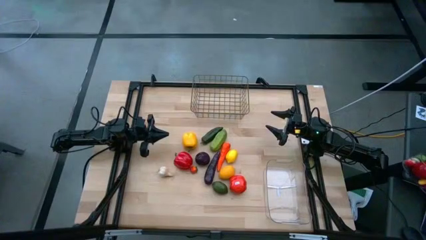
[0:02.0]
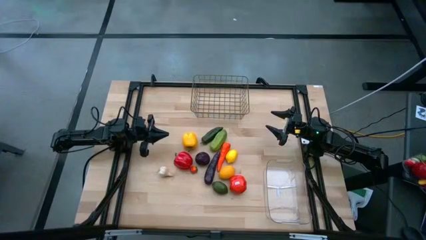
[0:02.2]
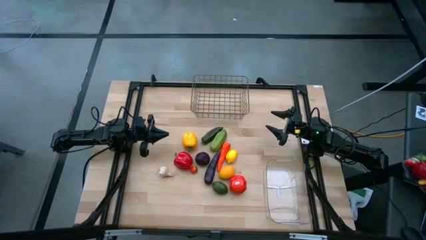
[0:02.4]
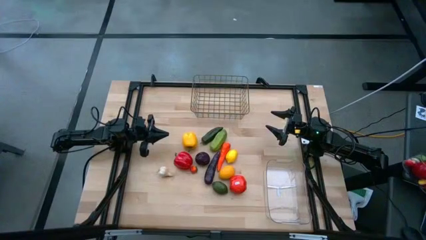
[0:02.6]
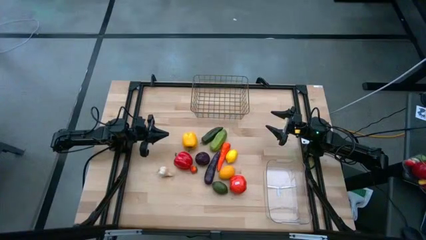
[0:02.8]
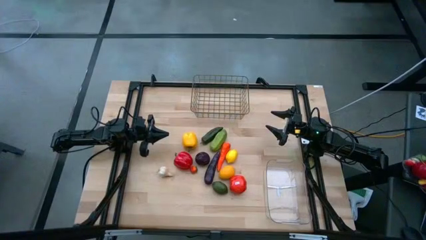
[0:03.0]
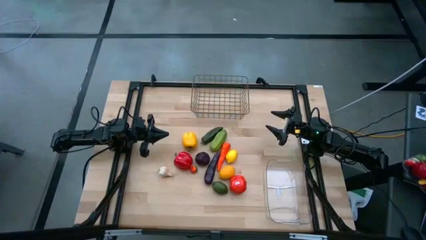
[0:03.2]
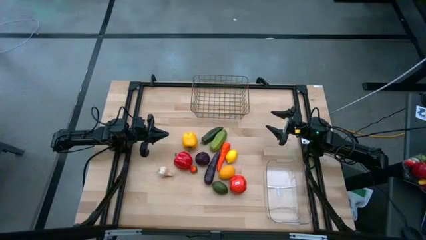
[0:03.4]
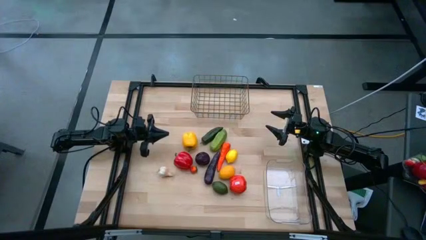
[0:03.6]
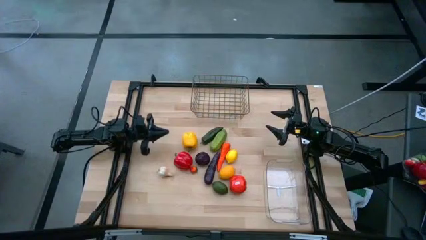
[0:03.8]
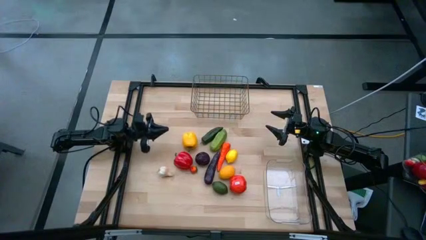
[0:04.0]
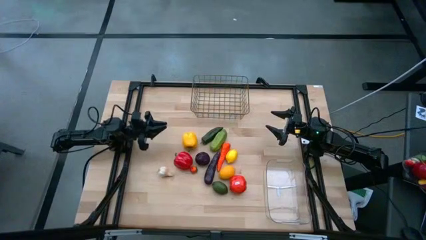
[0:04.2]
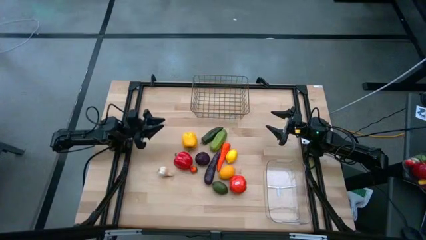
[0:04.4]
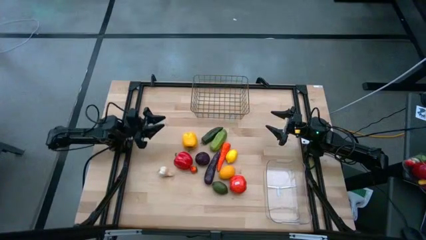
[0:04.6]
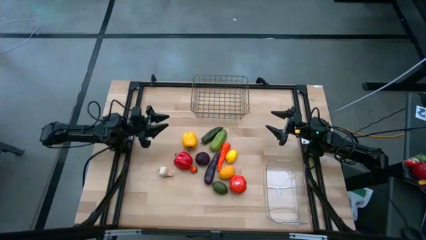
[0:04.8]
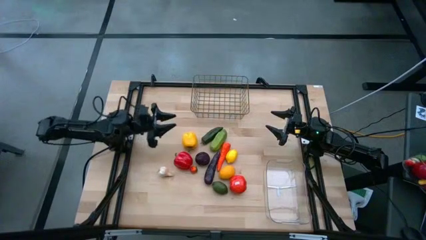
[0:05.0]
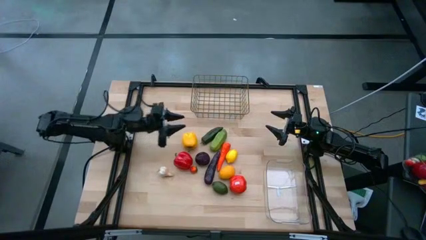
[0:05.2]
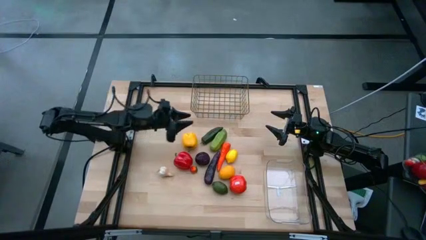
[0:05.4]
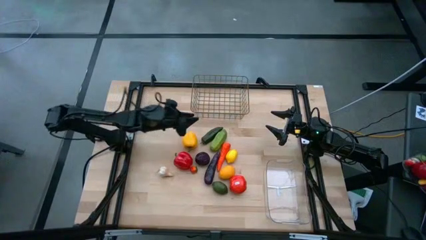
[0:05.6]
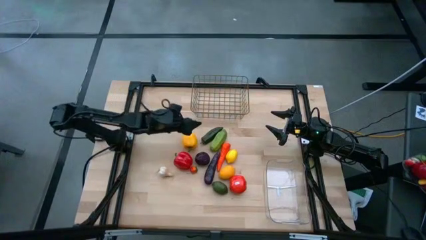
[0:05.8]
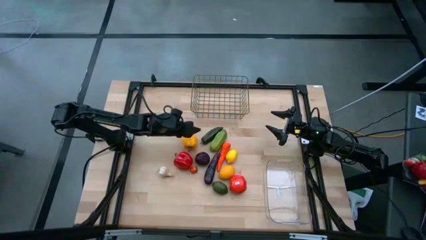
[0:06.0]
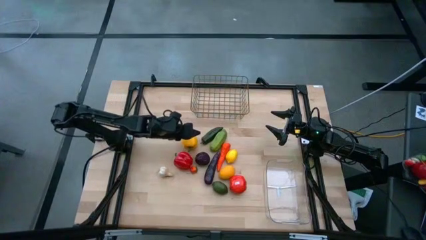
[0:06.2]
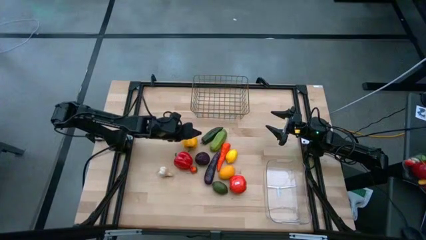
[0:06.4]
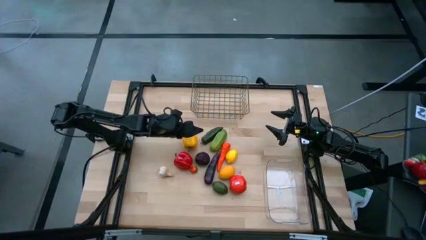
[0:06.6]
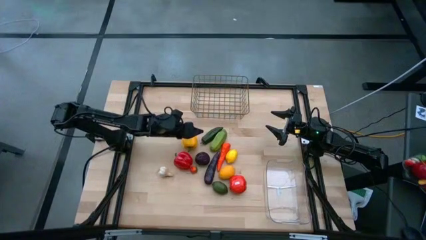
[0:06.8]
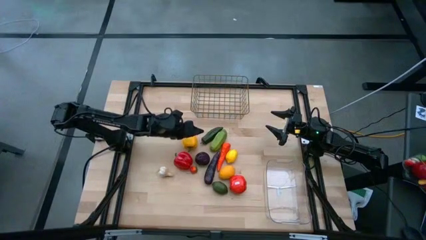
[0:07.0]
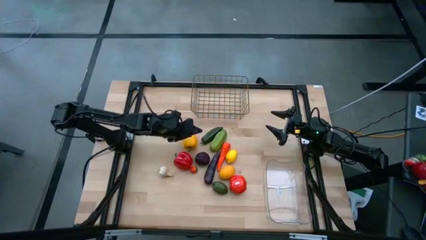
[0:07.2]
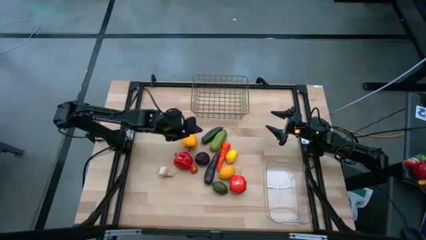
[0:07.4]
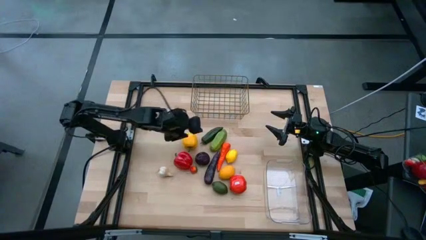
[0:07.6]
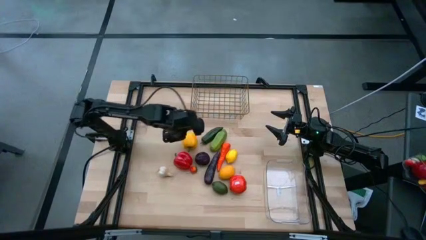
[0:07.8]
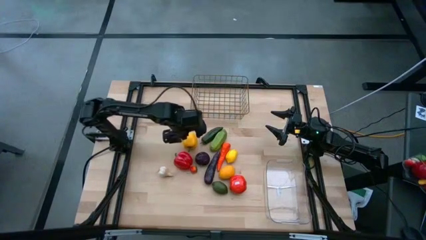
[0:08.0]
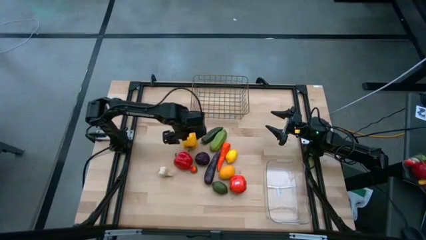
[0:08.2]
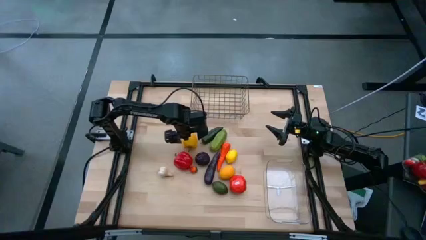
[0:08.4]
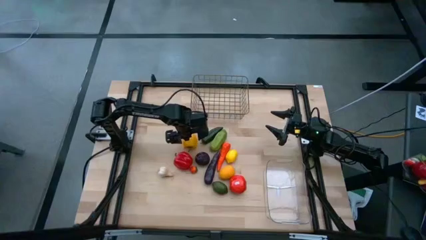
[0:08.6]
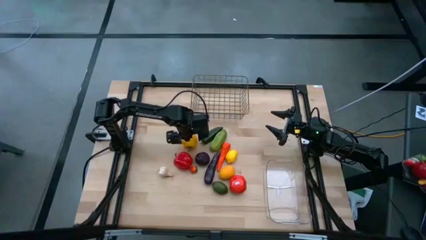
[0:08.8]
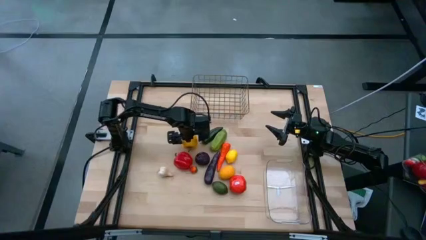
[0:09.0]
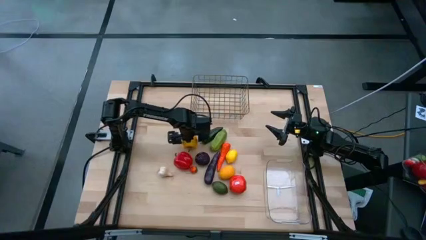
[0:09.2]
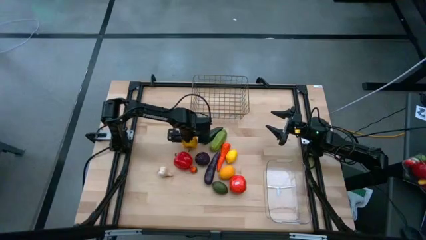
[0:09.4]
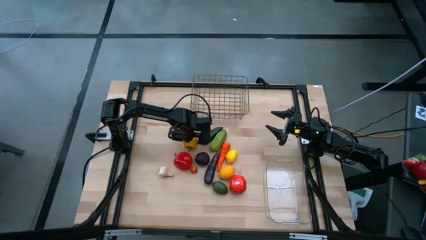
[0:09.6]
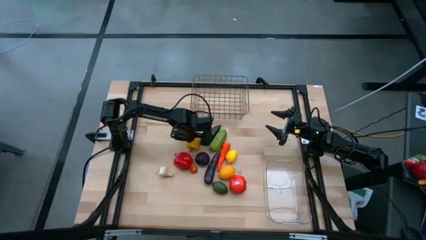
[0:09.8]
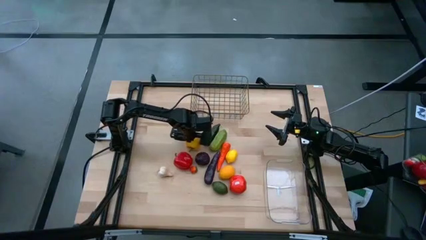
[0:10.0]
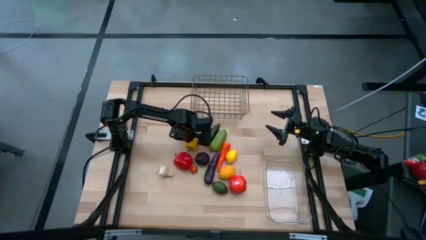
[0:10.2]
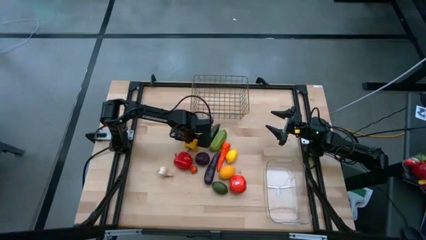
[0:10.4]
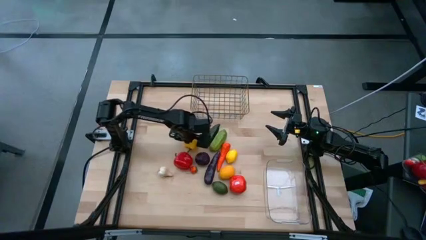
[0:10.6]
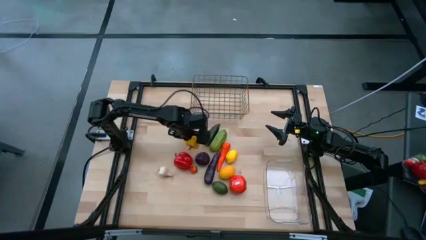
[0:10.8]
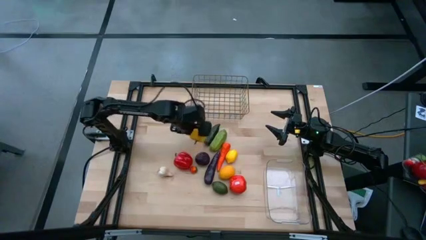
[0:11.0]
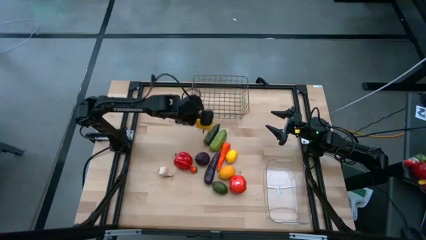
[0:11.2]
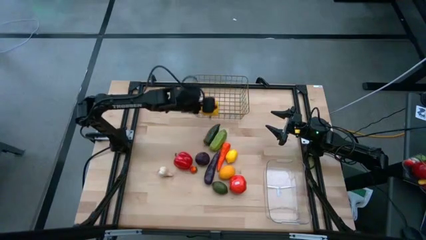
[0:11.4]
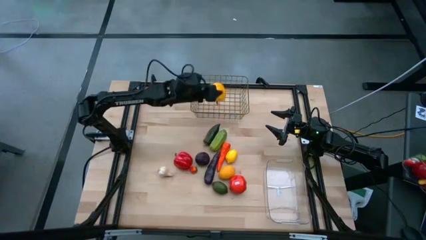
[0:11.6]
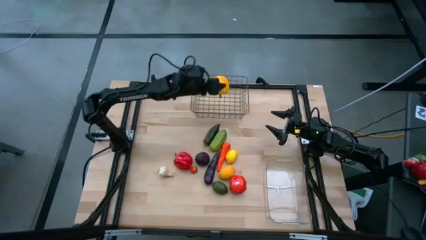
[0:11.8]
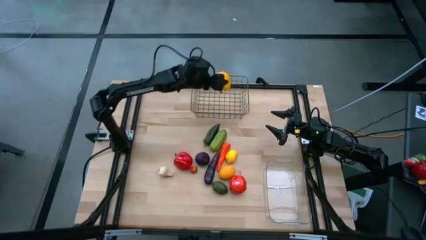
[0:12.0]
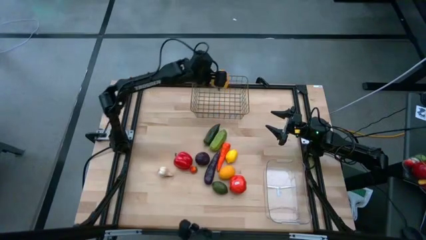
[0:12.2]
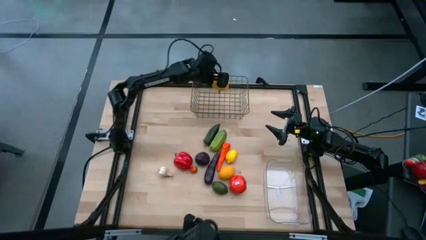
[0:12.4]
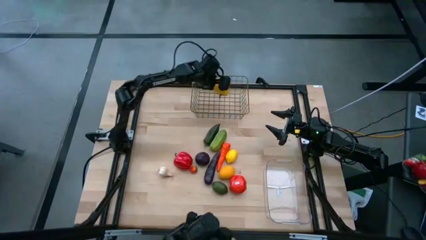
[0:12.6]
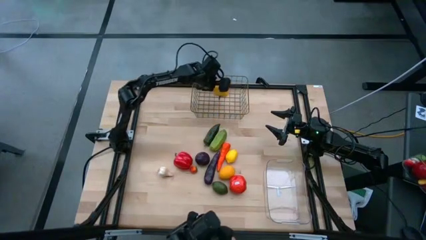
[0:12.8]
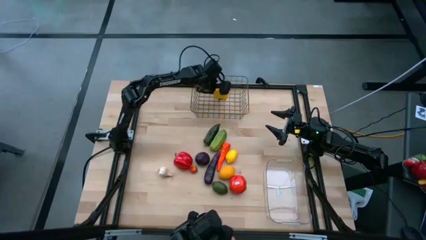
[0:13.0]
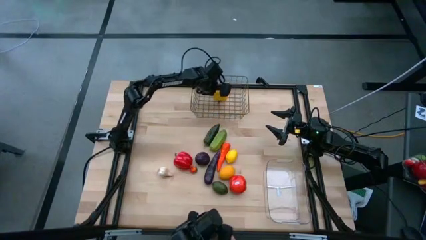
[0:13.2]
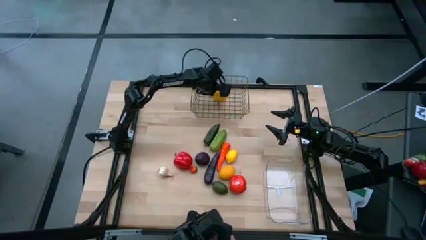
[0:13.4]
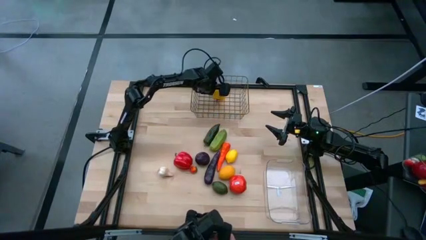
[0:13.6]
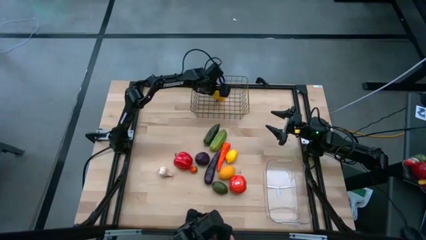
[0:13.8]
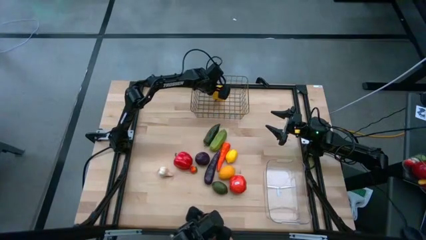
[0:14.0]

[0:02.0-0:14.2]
Task: Sort produce into baskets
Put the yellow bell pepper into the wire basket

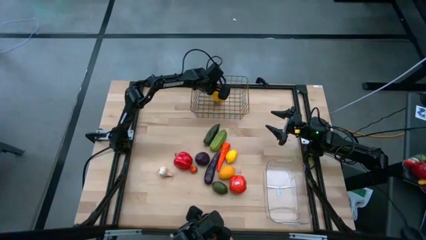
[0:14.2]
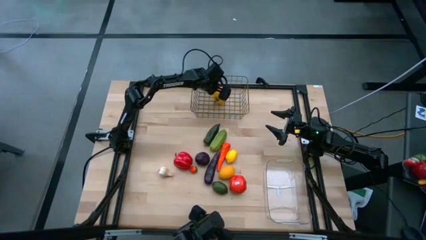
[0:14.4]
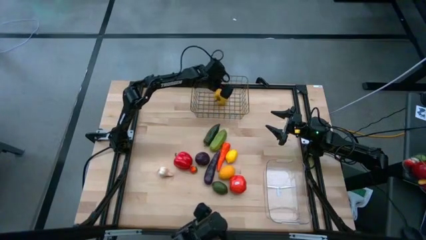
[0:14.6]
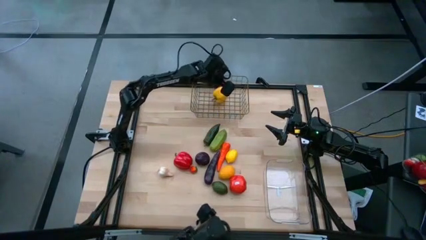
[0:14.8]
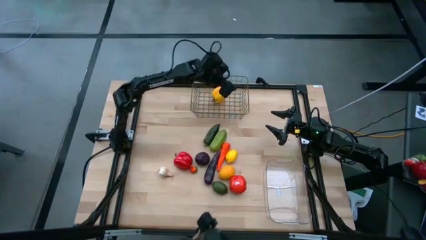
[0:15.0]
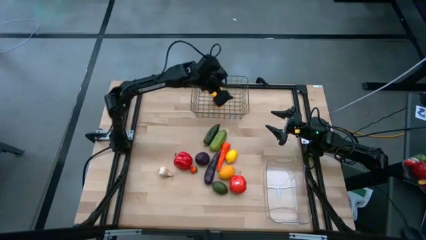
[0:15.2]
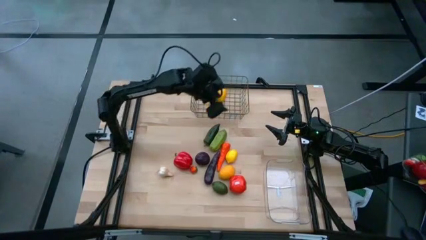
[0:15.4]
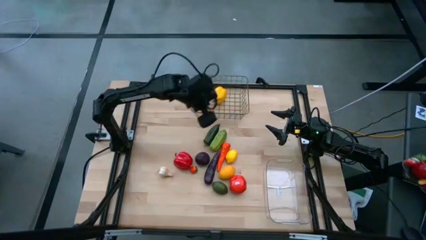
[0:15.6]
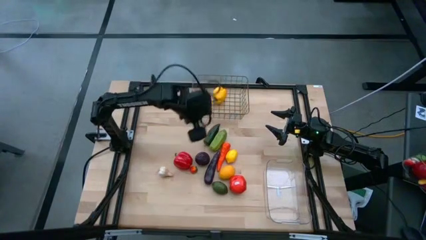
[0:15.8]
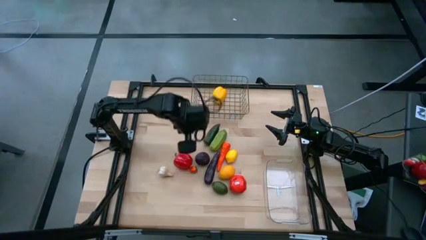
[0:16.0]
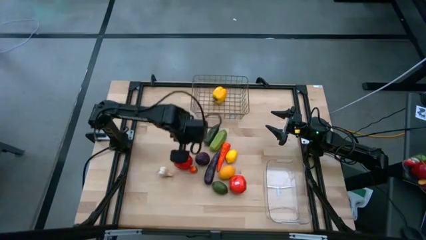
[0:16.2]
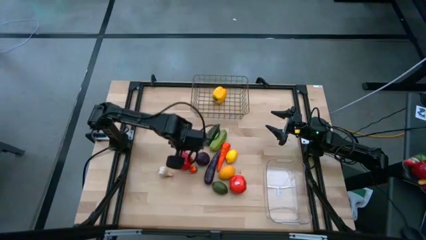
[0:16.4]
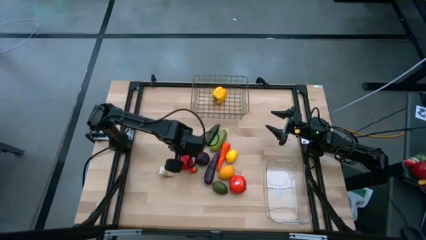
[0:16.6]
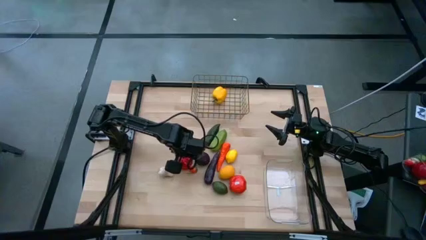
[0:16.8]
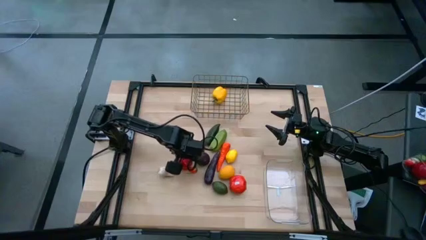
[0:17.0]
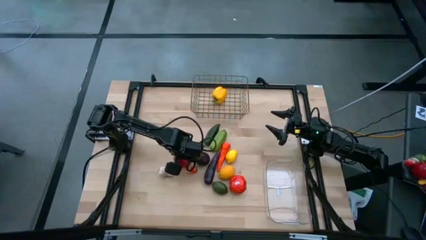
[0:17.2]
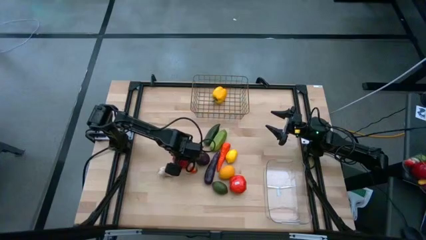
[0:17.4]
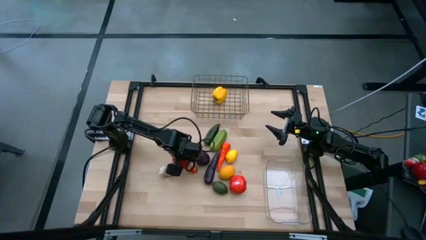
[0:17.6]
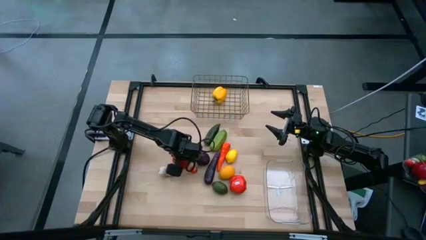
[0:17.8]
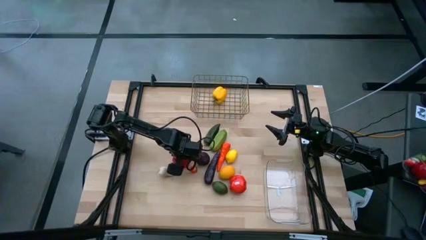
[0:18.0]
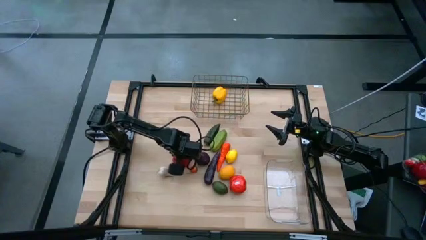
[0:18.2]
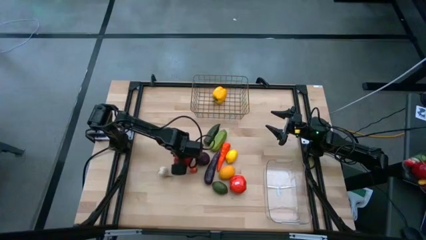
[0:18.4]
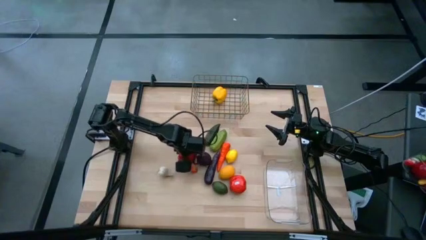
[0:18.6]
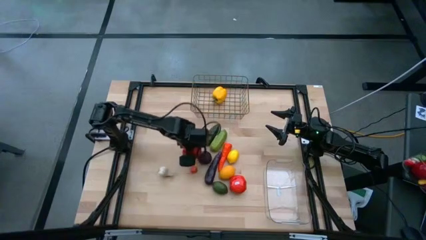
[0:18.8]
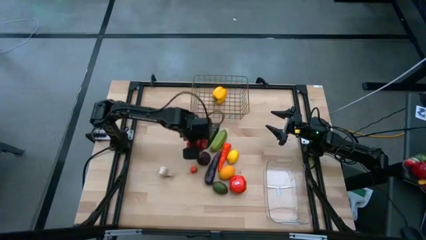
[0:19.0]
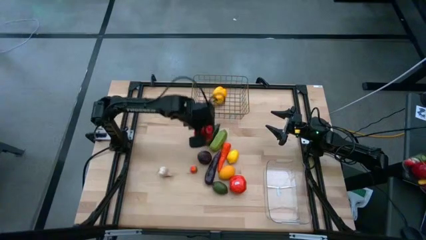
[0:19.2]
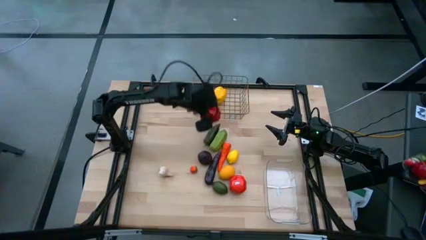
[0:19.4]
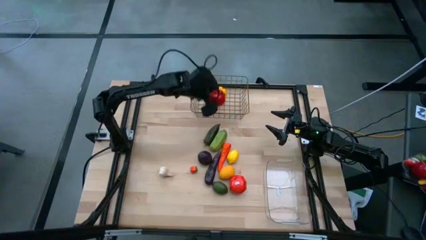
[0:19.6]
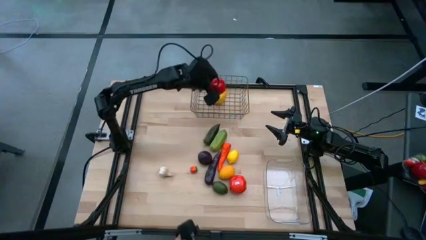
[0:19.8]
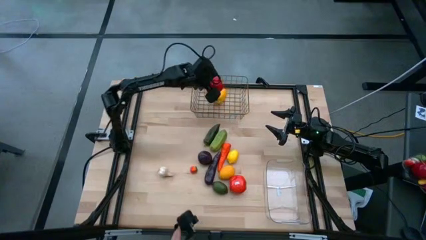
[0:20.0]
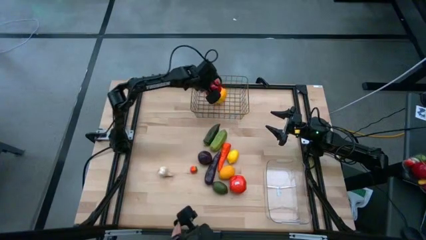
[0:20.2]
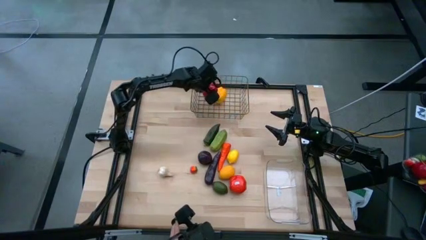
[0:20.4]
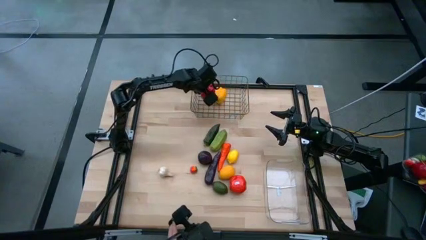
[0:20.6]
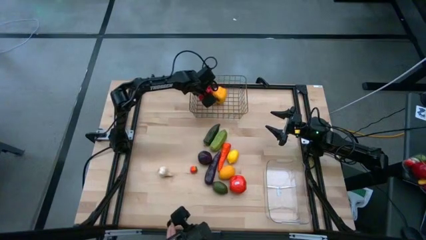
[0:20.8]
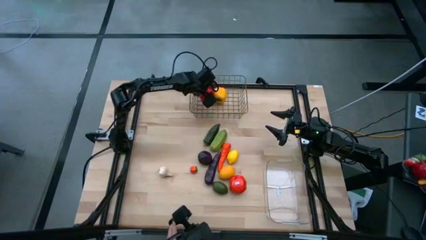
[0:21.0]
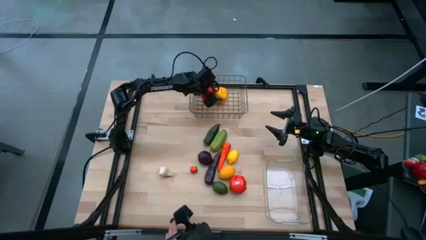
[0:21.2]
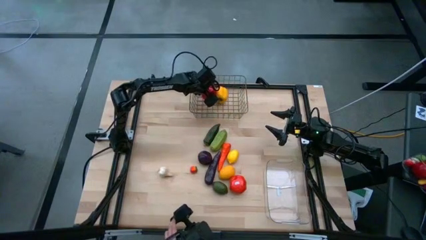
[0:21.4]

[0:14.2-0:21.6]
Put the red bell pepper into the wire basket
